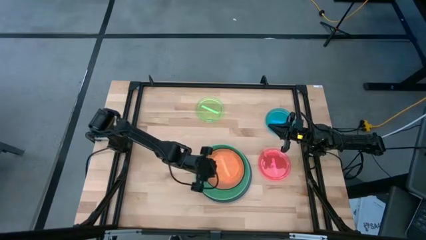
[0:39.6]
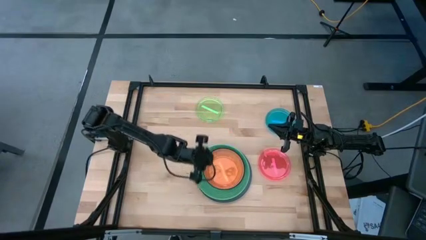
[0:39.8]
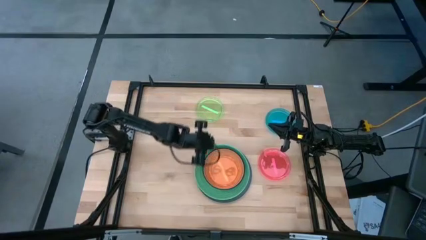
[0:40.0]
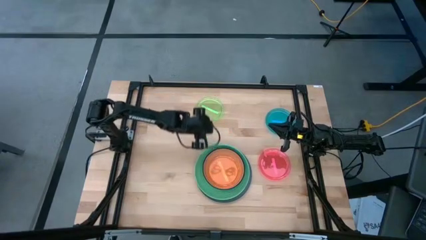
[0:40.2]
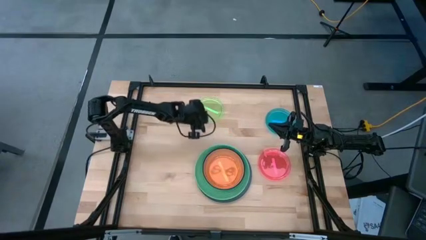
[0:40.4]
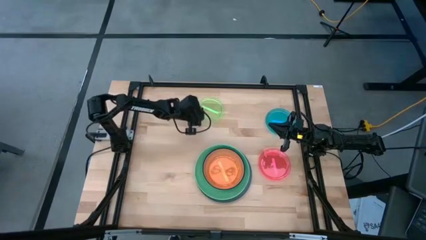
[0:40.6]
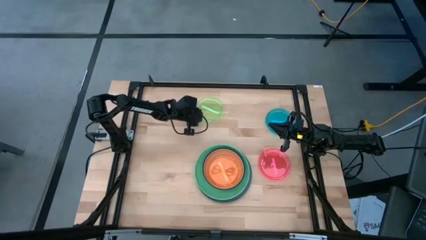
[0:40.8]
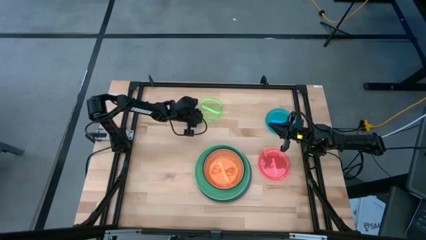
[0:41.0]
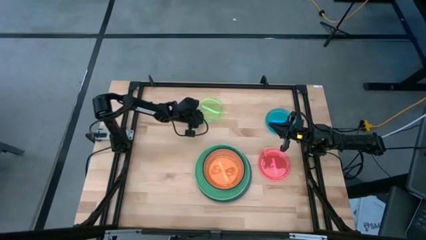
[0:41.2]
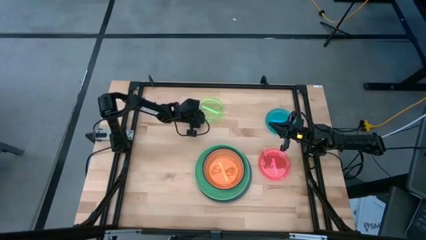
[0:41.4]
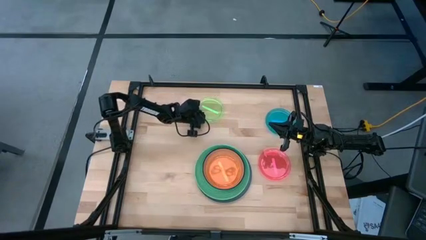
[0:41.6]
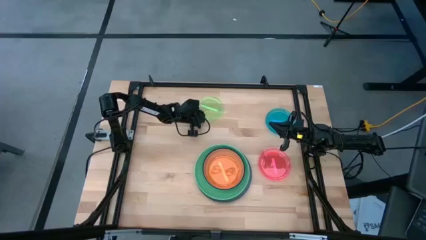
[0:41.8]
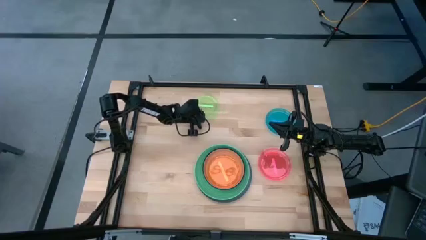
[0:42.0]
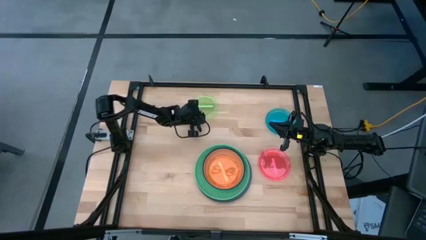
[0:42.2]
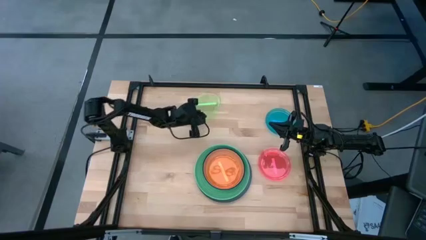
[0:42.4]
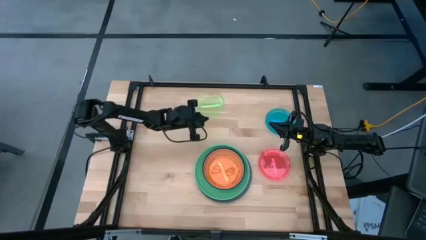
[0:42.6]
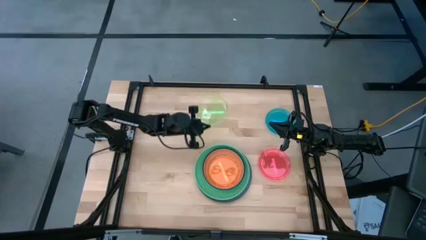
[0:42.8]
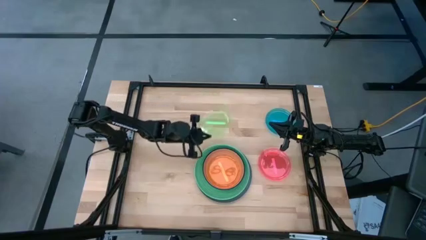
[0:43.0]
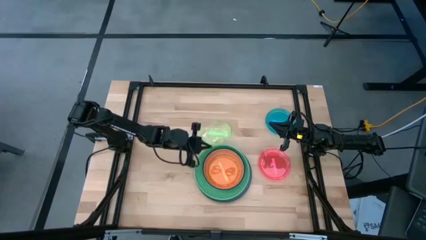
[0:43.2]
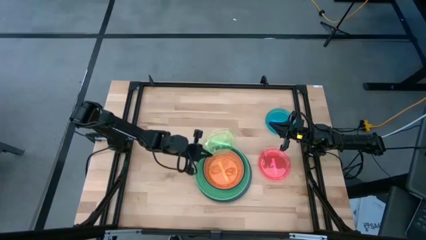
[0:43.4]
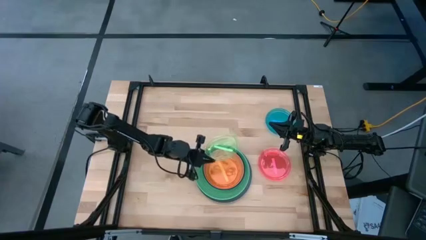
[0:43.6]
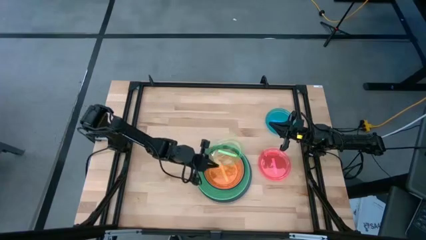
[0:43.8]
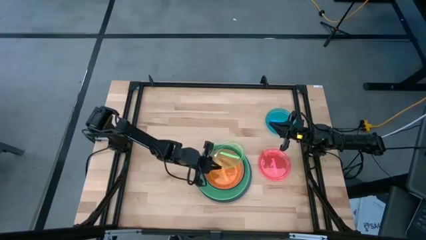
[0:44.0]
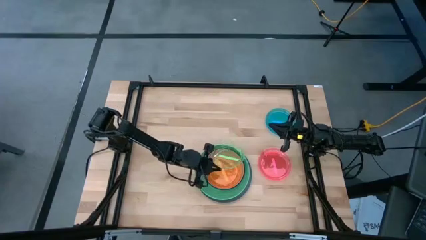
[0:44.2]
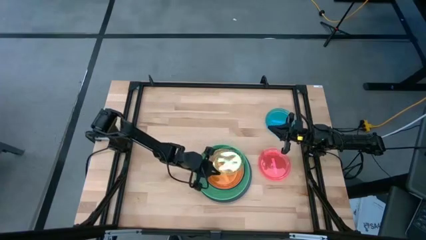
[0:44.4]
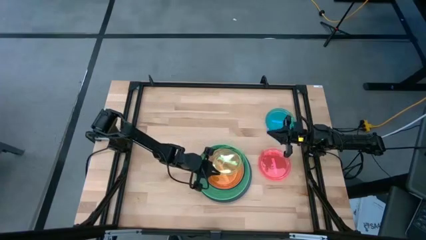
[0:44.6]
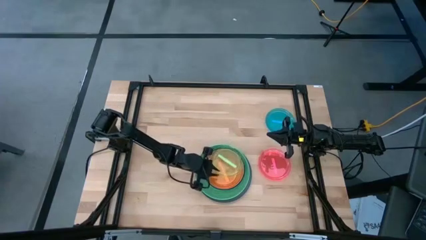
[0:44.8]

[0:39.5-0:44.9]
Task: Stack plastic plates
Stack the light green plate on top of the orange plate

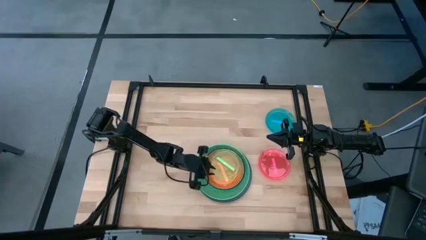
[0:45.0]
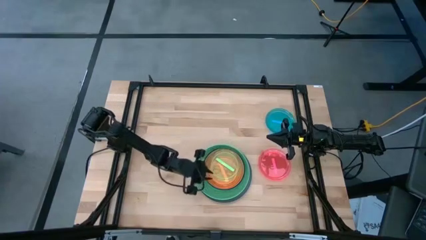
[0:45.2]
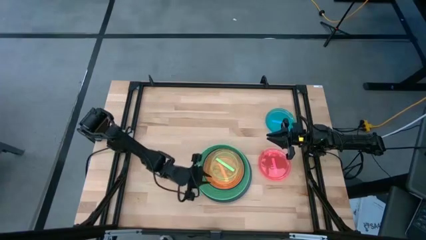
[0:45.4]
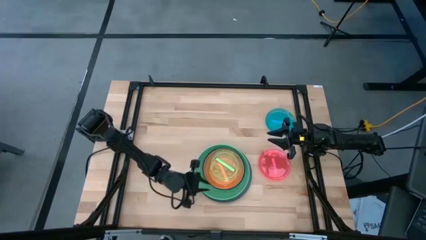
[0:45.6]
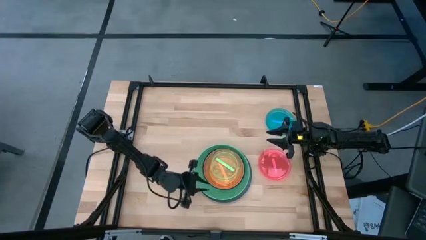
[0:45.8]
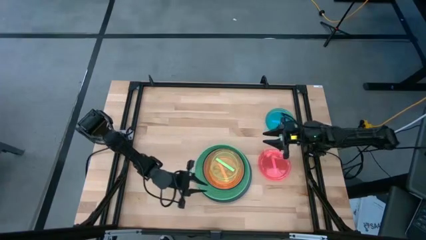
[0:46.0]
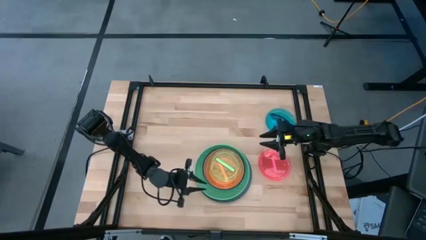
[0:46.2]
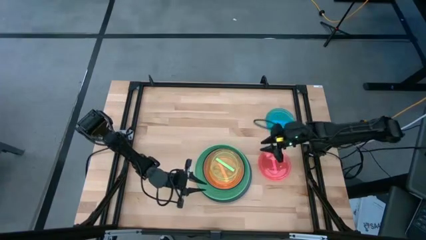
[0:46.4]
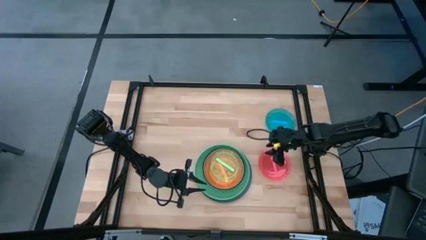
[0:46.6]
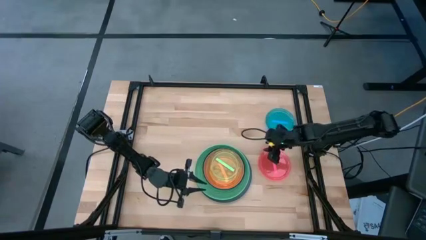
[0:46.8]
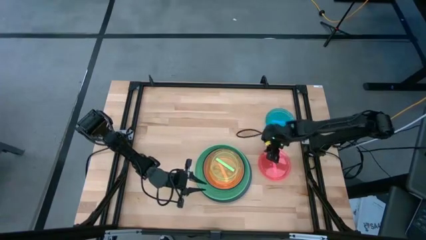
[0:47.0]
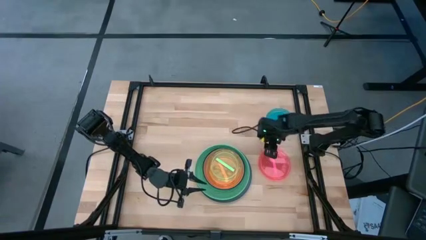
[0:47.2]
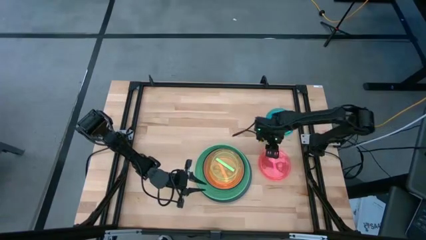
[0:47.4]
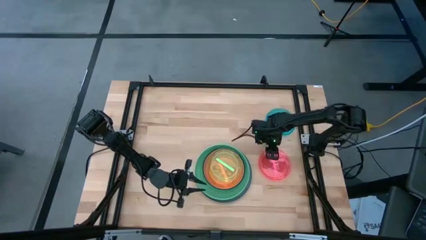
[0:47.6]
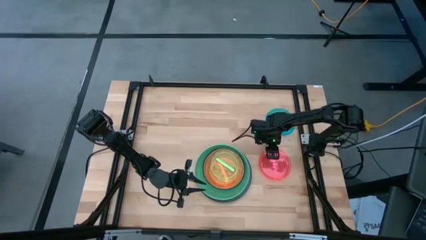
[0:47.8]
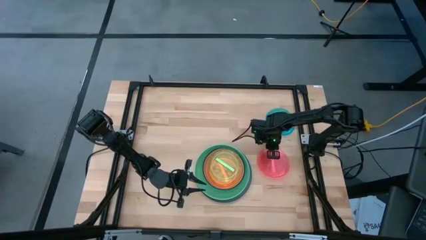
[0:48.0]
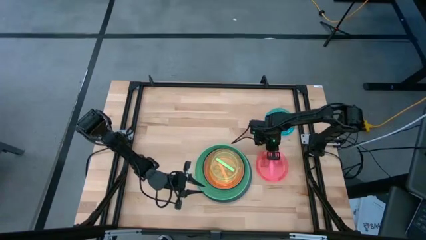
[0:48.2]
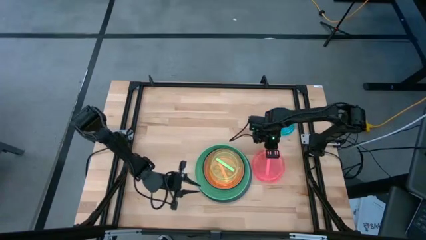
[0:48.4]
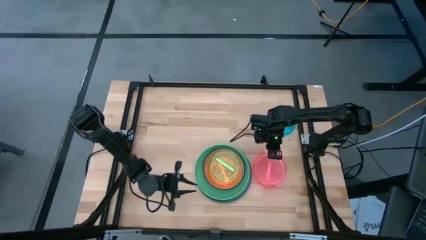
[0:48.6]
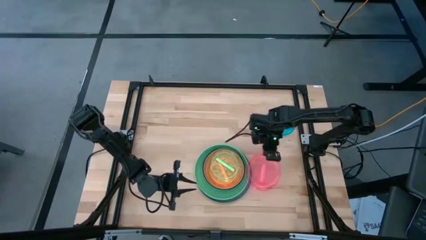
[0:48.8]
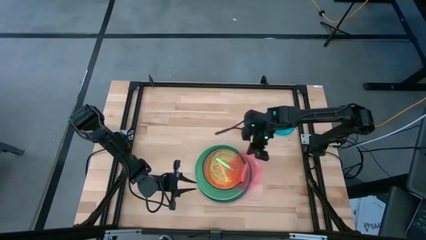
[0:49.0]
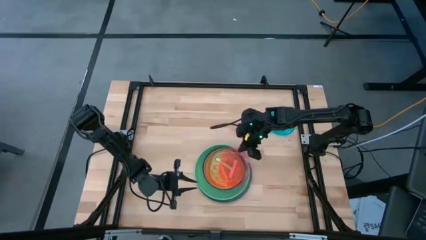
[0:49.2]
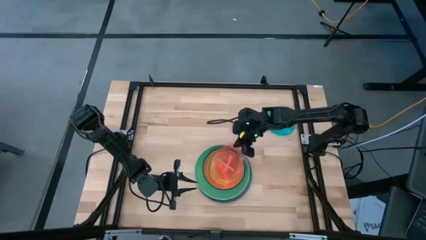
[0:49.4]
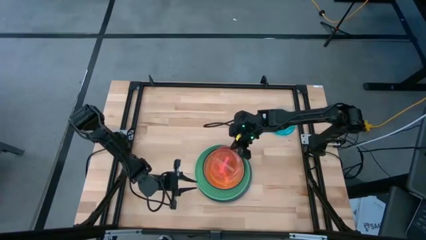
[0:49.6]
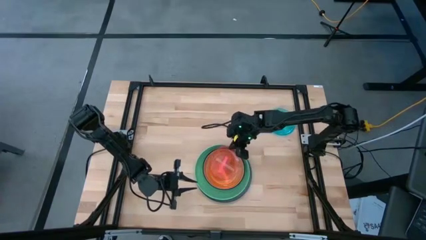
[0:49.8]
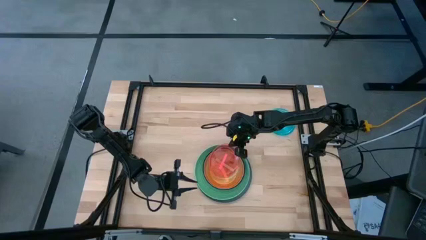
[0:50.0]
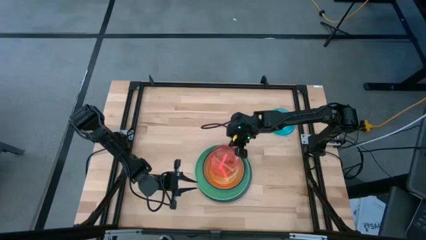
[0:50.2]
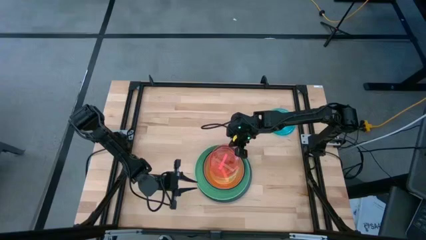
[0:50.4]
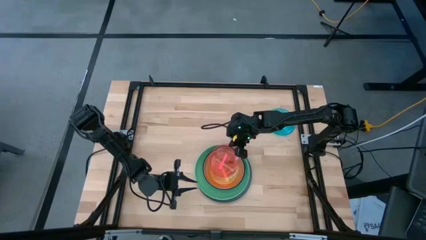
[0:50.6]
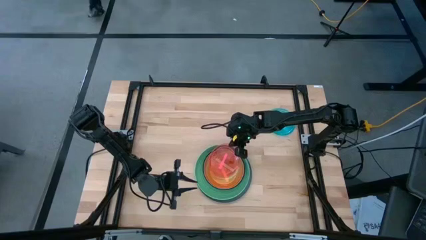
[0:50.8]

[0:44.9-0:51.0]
Stack the pink plate on top of the light green plate

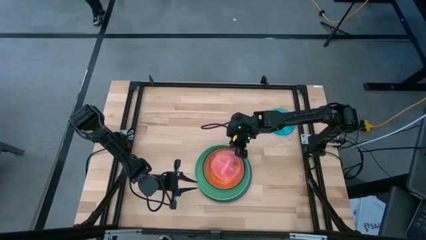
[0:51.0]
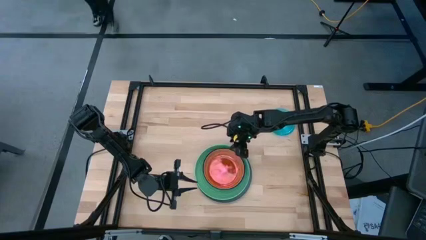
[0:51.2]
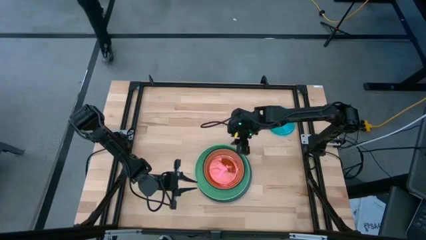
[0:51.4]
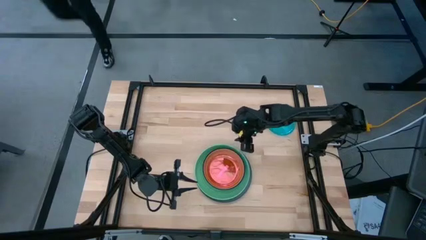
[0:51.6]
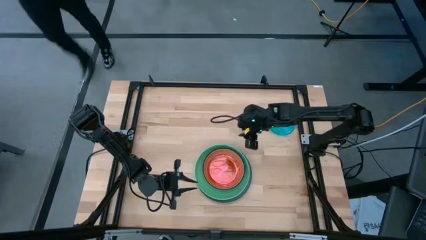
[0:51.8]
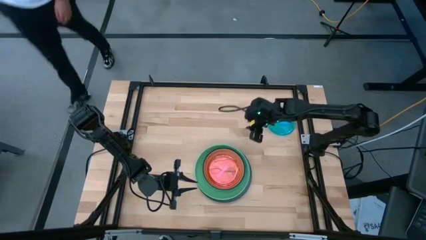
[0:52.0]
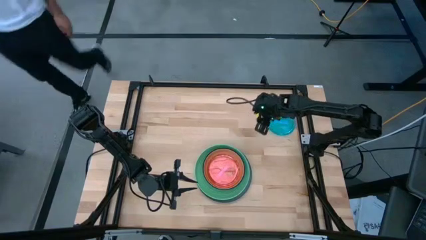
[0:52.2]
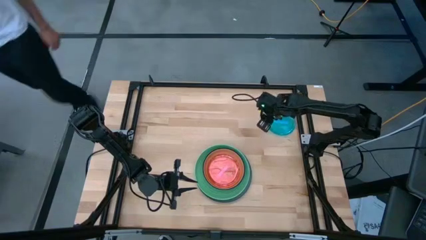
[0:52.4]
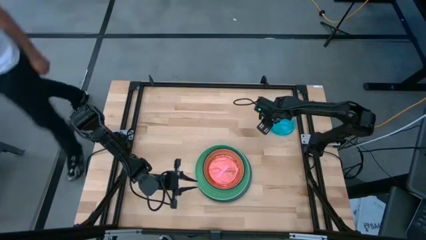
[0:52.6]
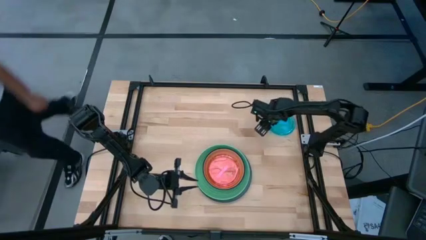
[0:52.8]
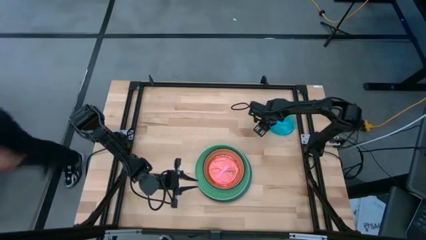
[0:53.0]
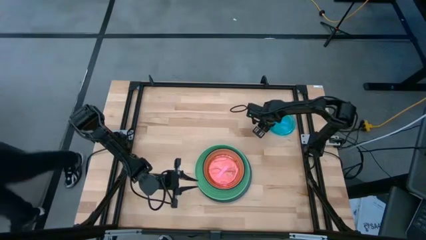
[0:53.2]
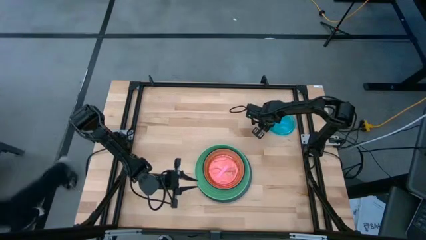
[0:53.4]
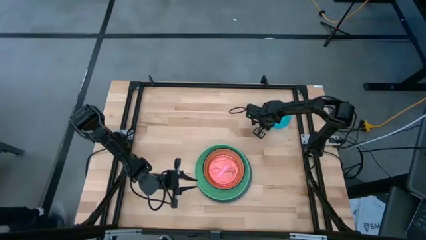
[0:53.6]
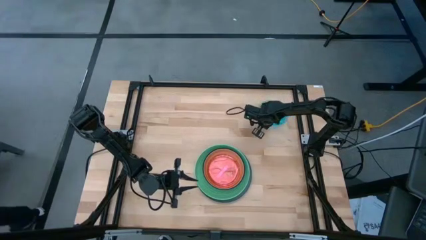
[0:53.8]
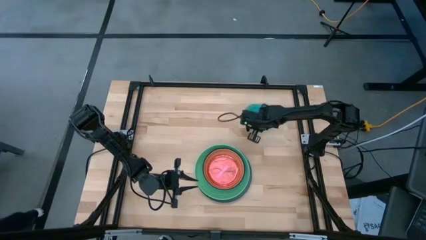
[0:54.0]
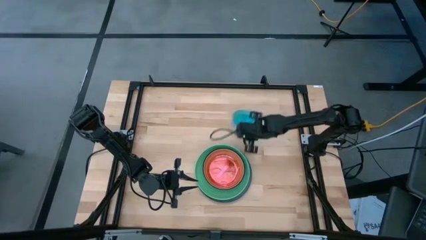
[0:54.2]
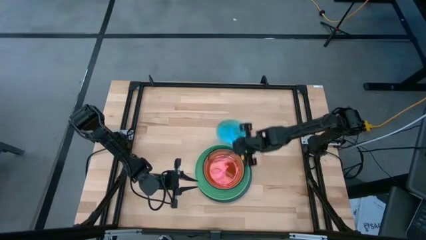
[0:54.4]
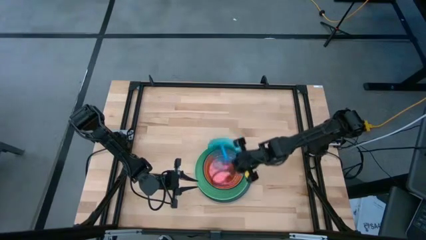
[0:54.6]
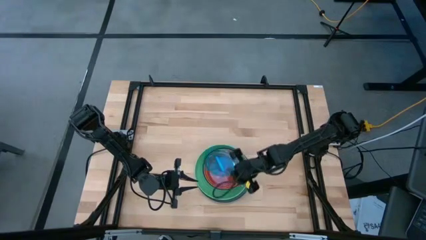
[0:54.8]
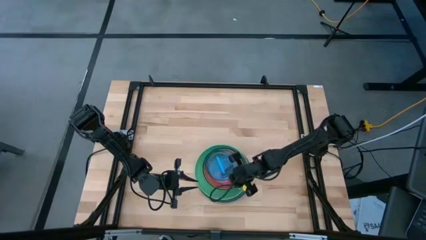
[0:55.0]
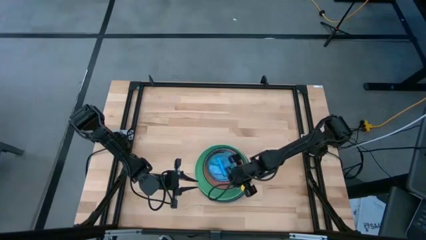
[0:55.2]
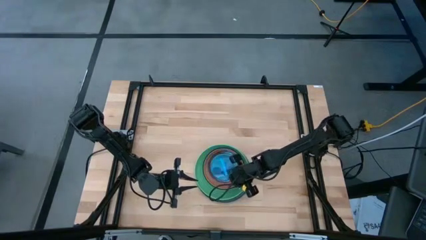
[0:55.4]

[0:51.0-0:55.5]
Stack the blue plate on top of the pink plate

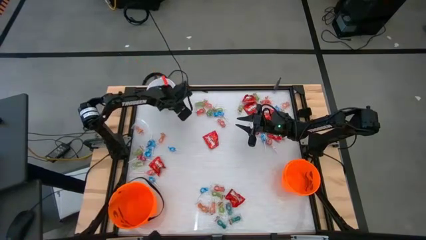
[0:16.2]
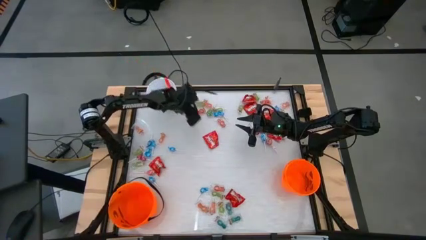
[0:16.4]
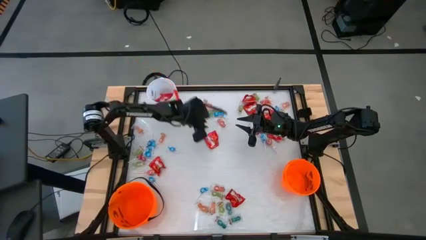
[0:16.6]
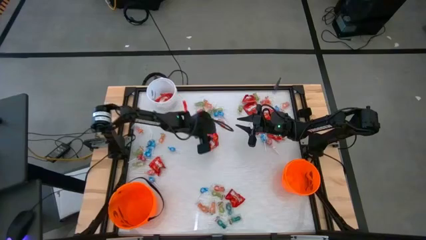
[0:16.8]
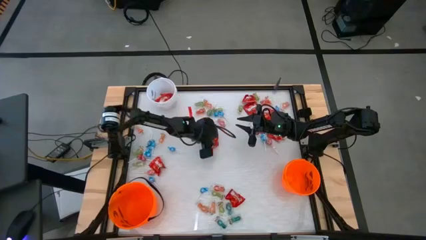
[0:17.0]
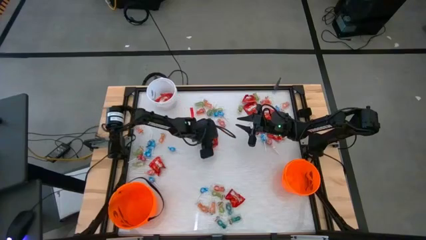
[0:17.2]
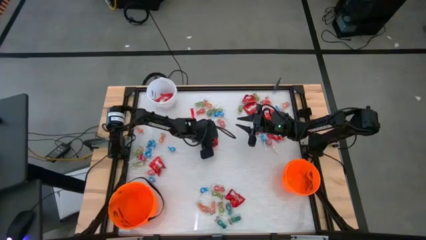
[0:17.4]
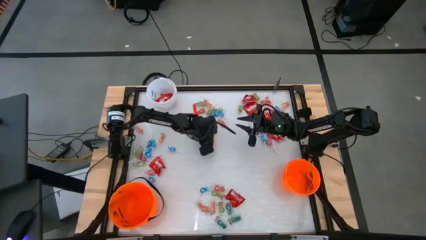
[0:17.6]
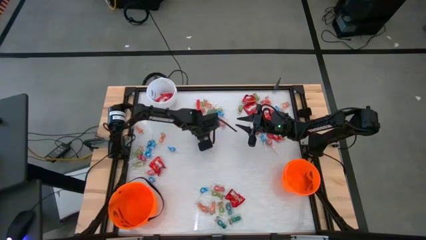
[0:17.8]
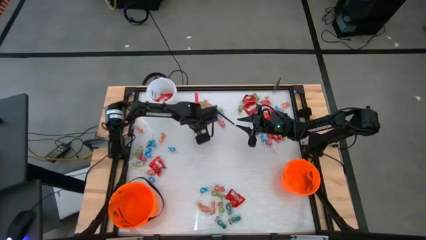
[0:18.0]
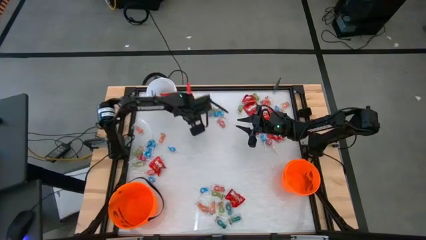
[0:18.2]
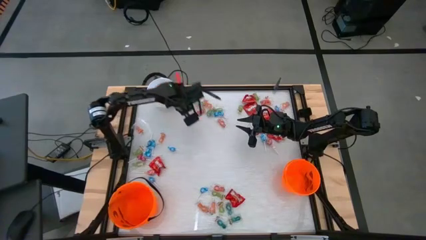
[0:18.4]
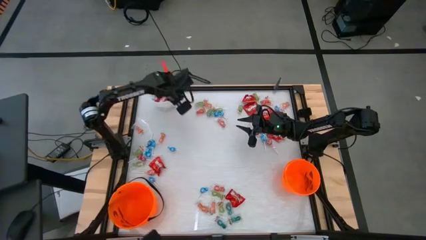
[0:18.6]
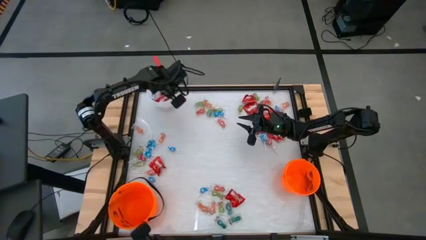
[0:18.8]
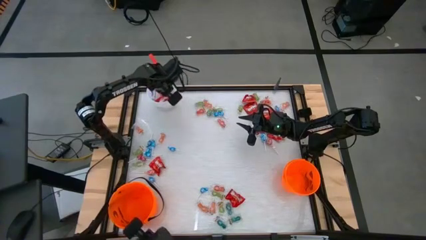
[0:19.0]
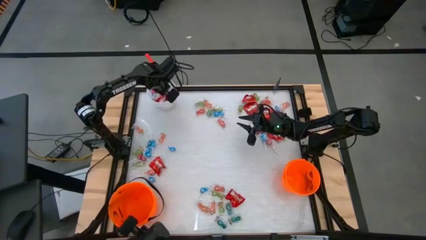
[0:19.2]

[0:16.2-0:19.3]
Task: Sort candy by brand, put in halloween buckets
Put the skittles into the white bucket
